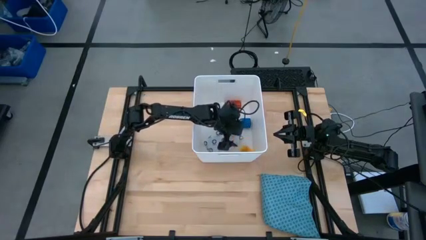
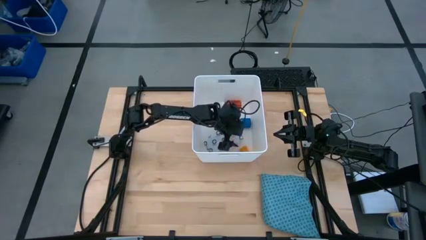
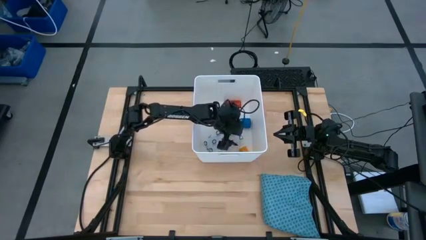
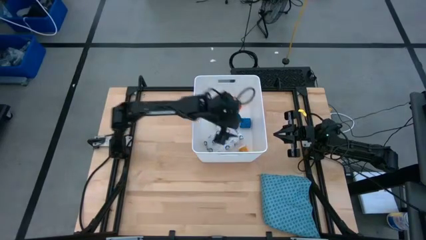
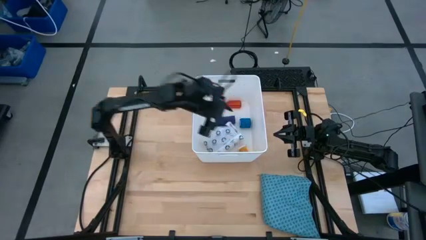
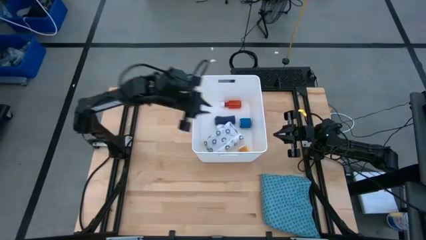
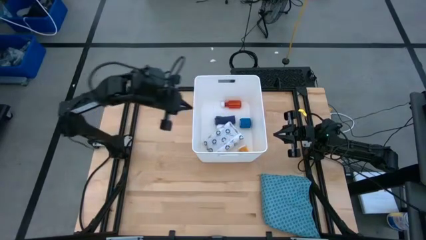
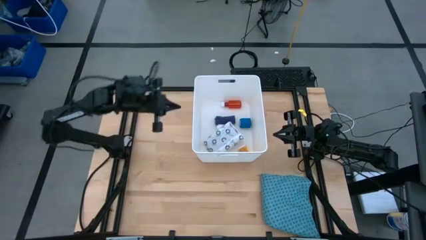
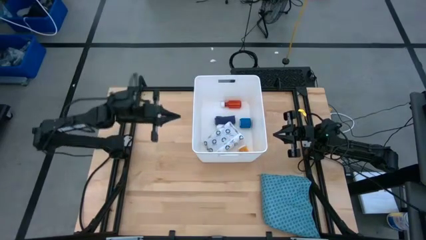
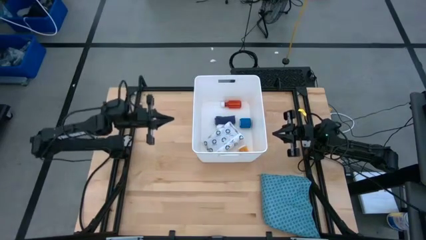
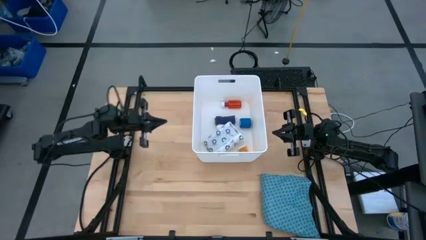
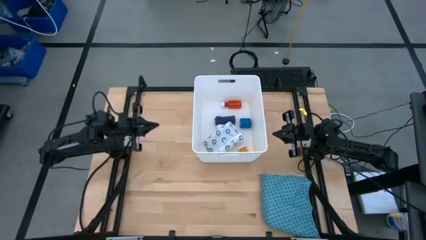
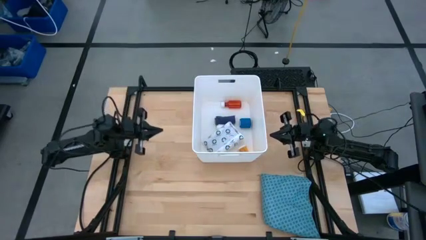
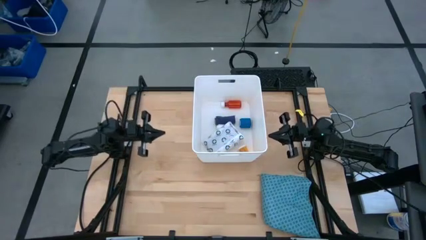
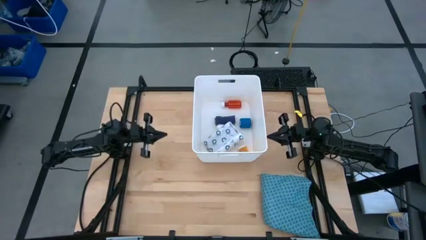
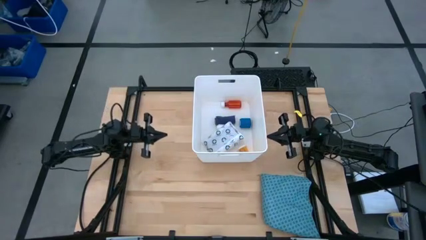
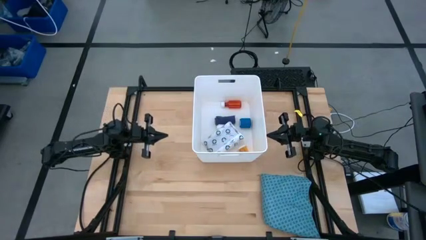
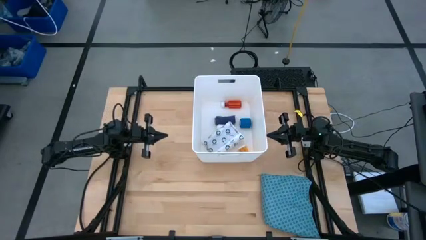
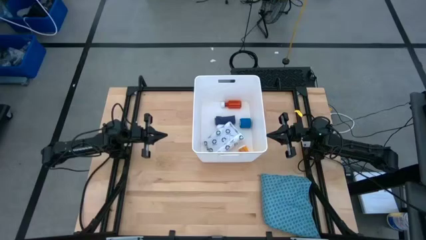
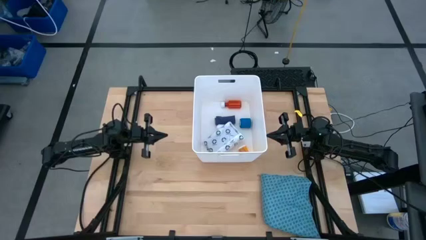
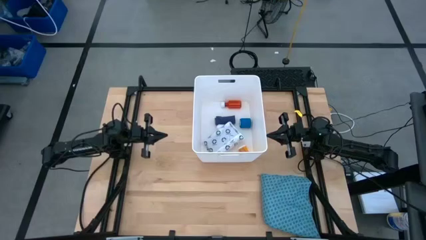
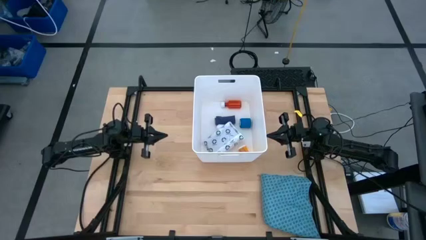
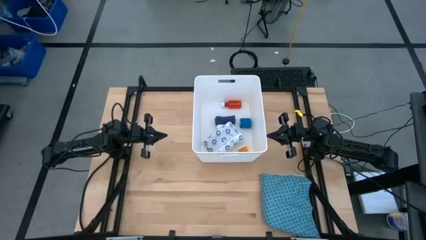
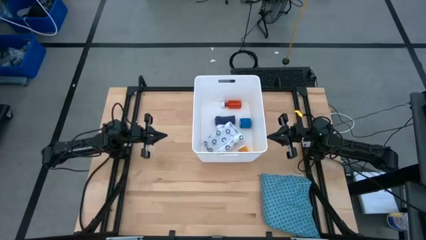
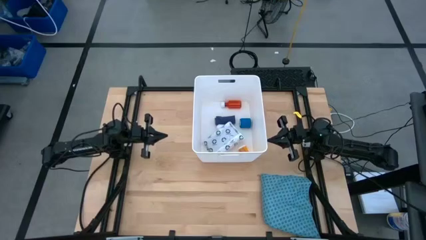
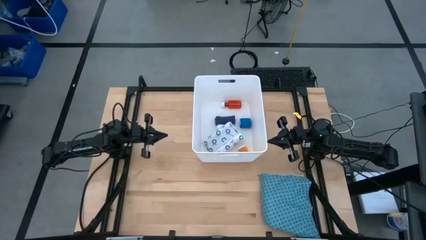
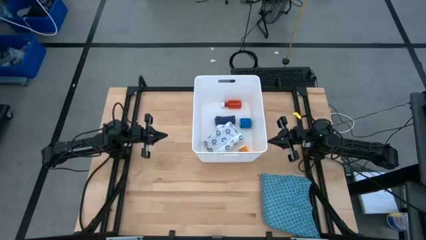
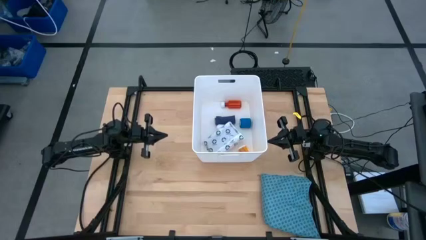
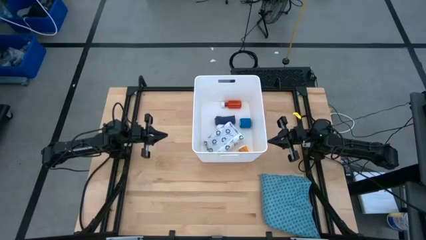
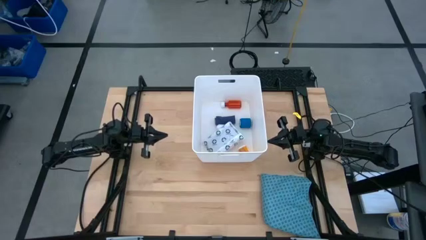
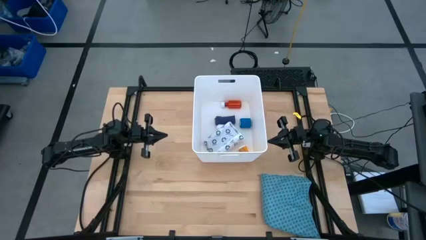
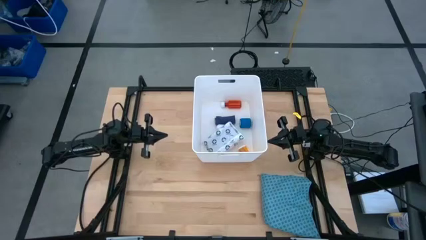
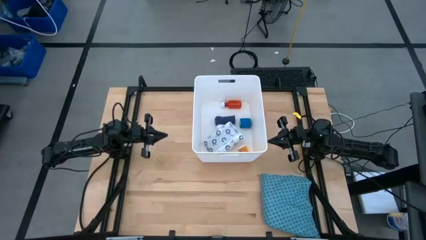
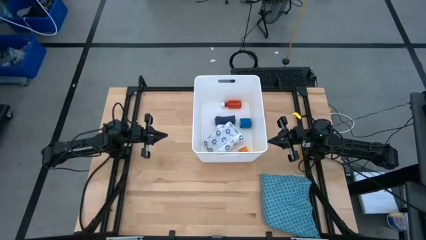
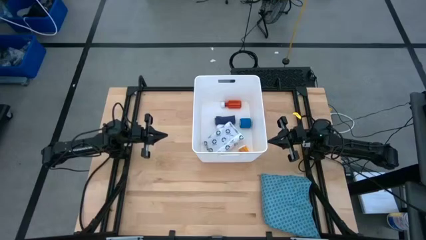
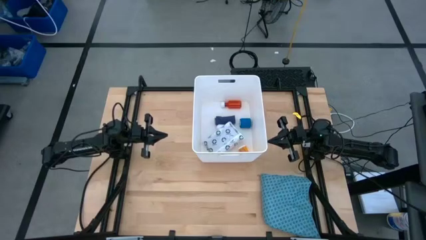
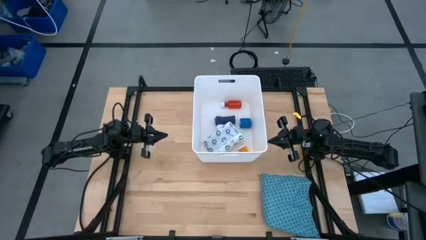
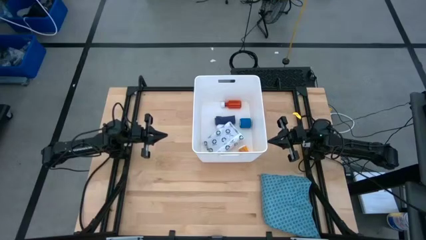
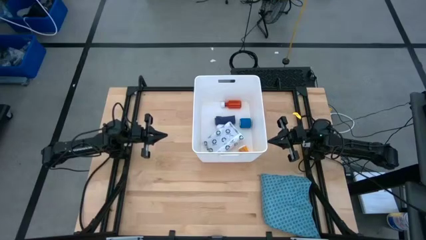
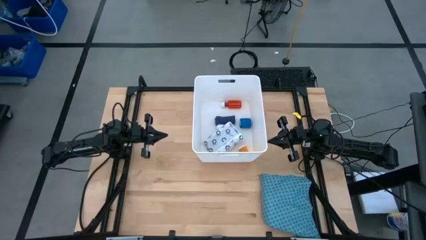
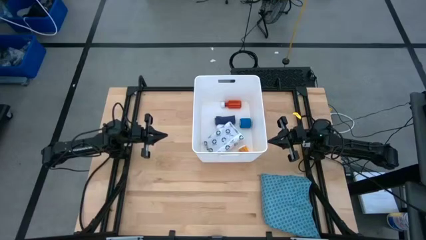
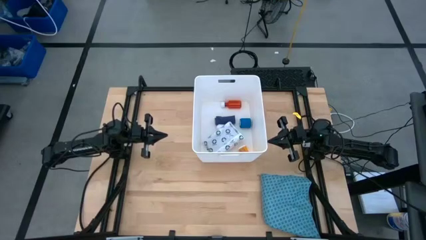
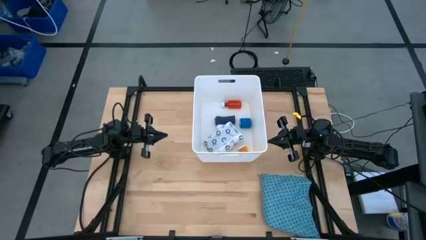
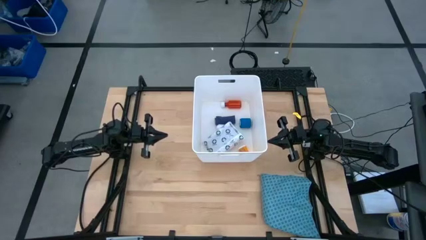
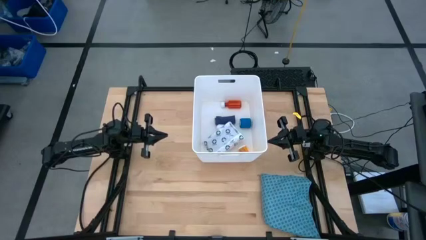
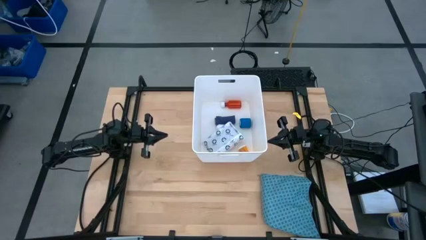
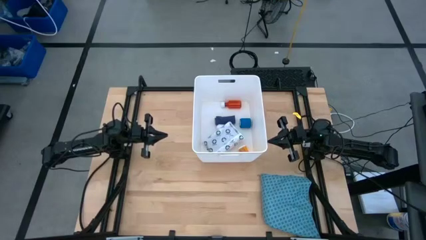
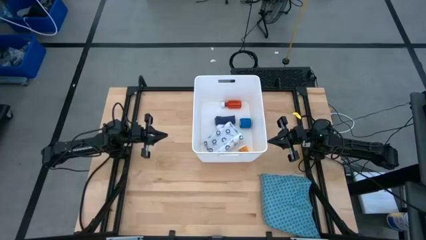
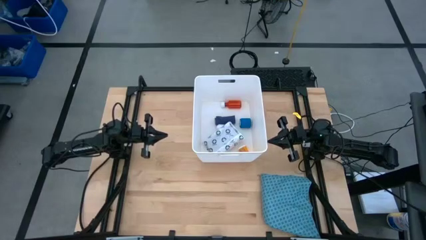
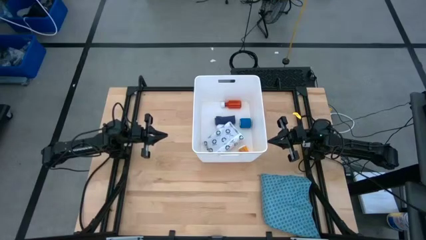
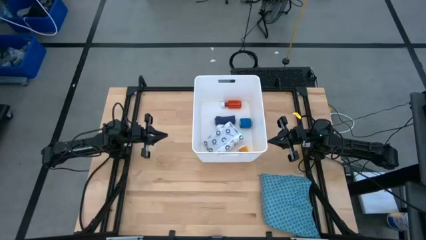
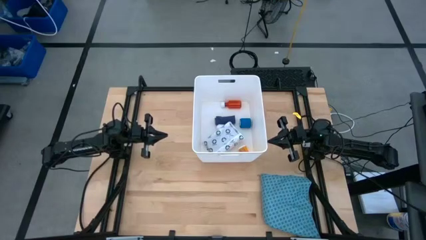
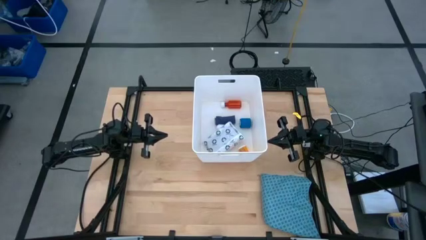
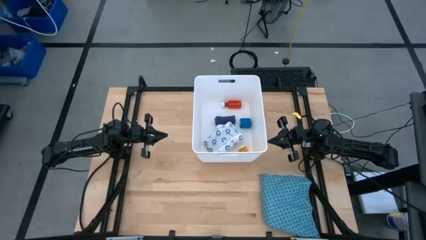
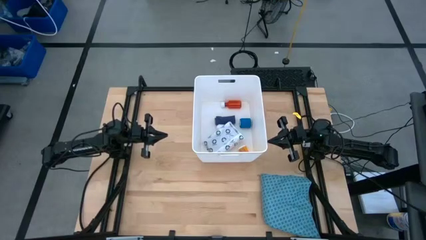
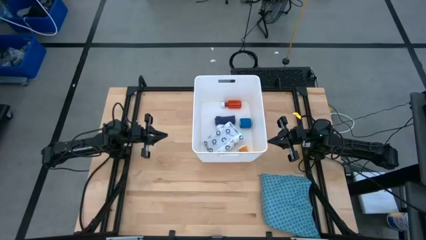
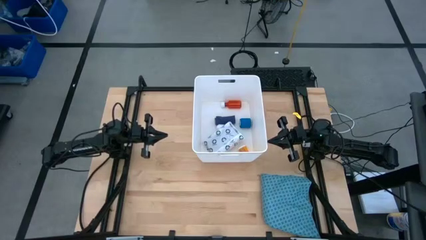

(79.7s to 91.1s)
Task: Pick & place medical supplies in basket/bin
Return to Home Position
